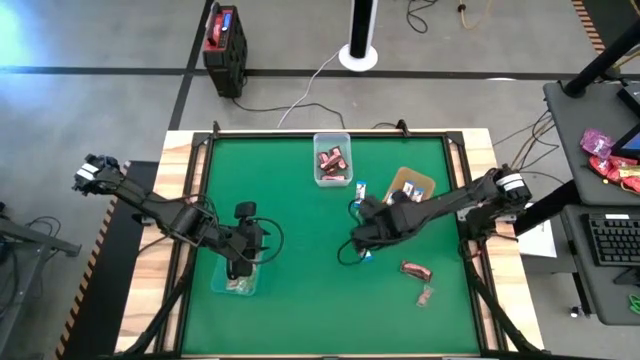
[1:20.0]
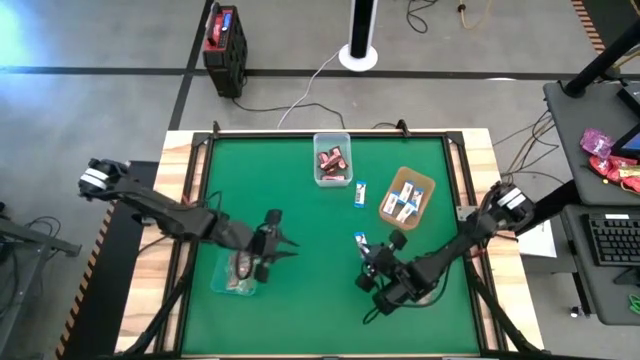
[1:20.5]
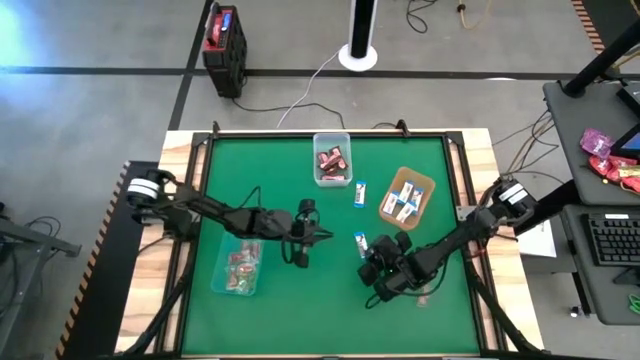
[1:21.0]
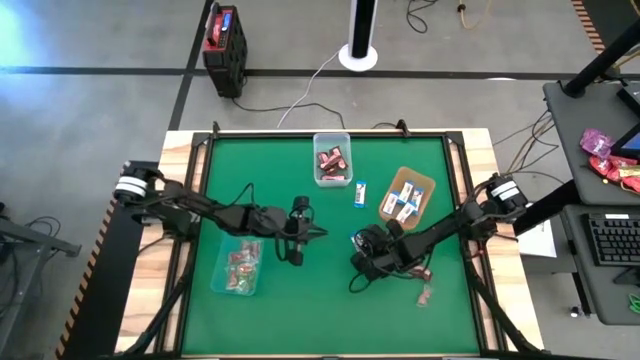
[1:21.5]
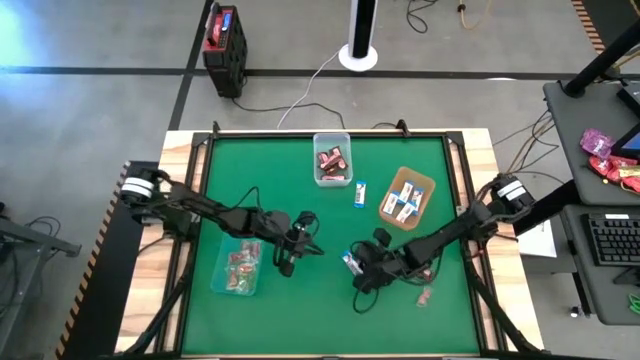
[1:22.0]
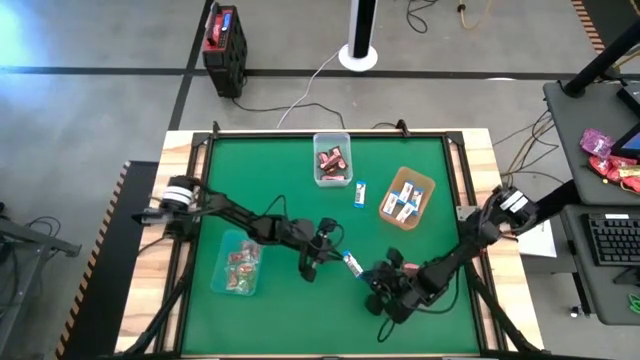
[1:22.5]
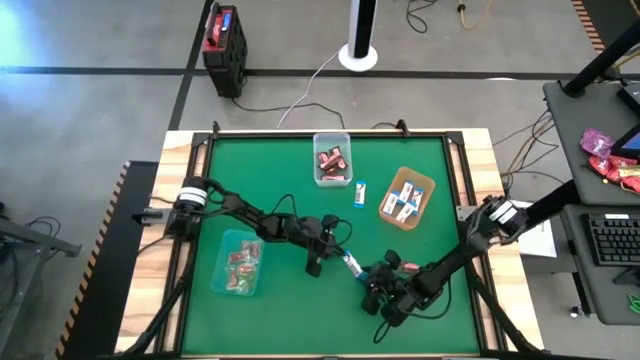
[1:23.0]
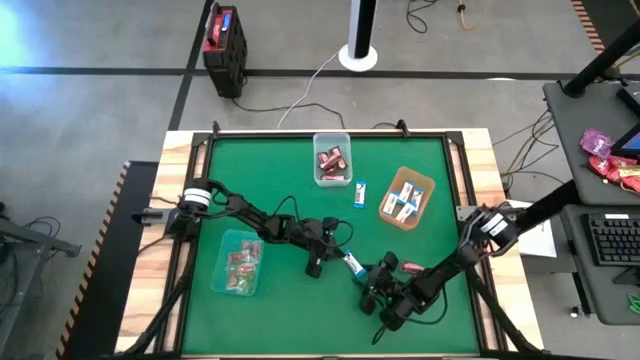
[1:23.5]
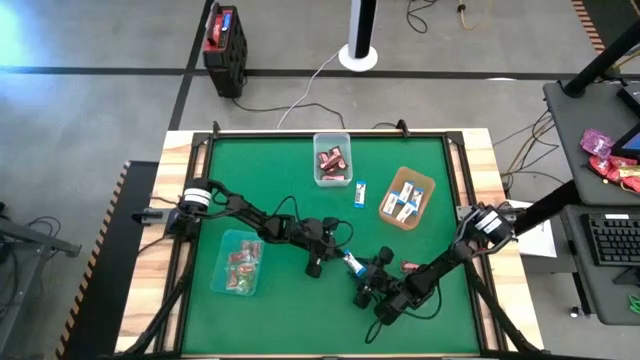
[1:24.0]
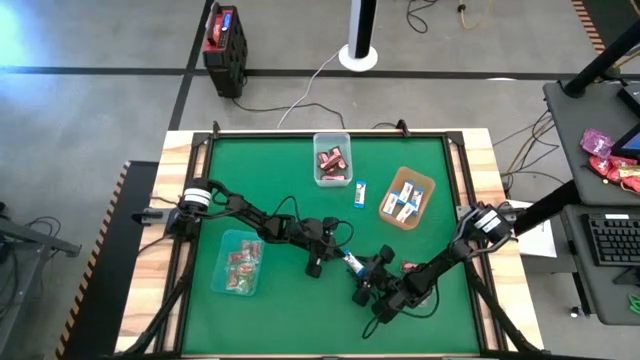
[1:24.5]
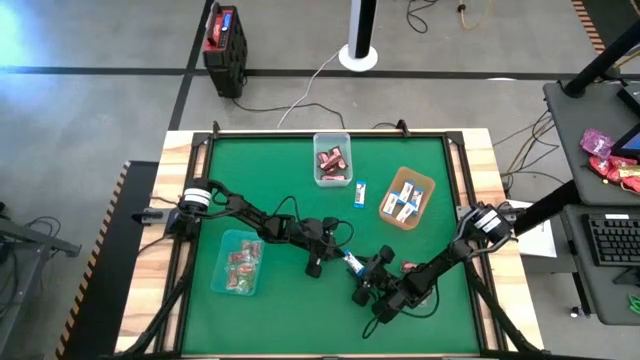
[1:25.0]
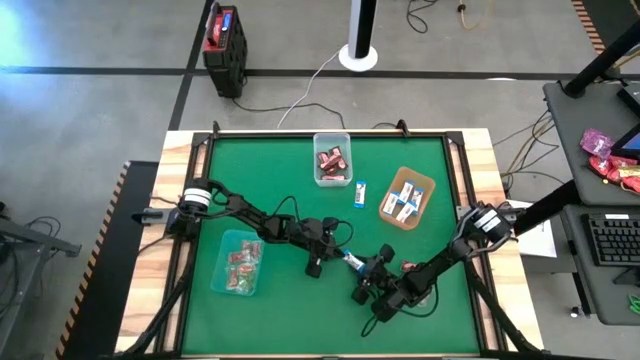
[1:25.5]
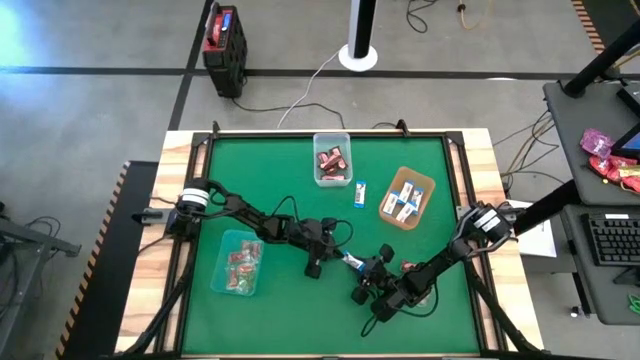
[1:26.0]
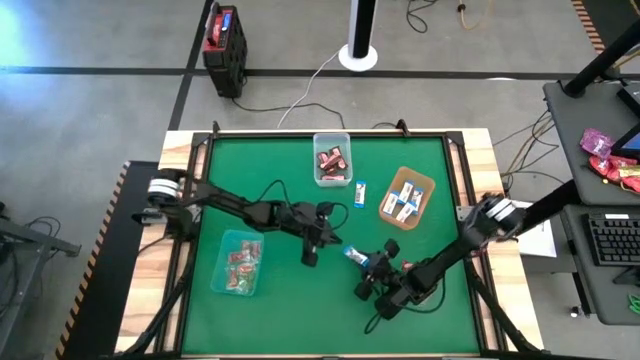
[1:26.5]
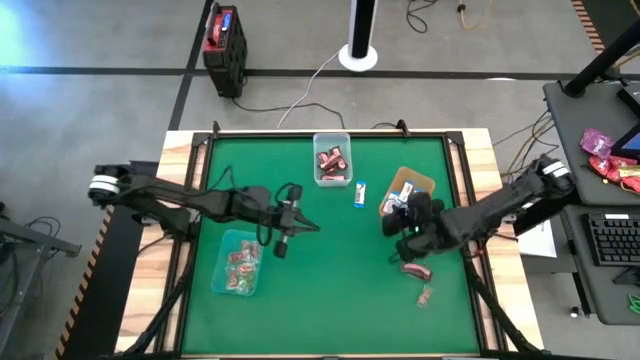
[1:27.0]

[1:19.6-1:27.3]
Task: Sort candy by brand, put in halloween buckets
Put the white chocolate into the orange bin

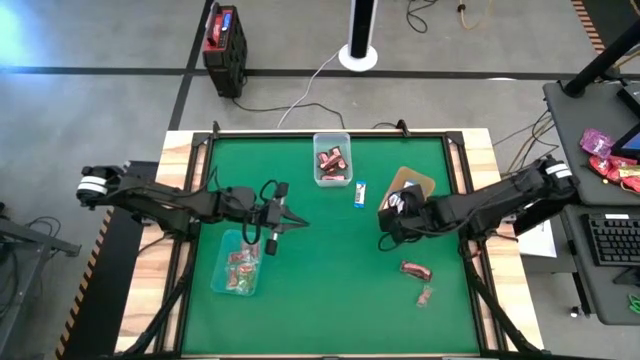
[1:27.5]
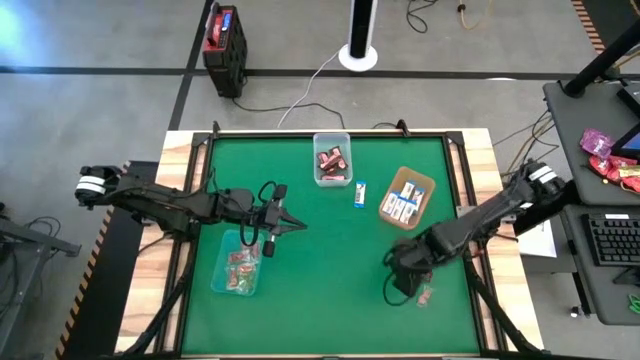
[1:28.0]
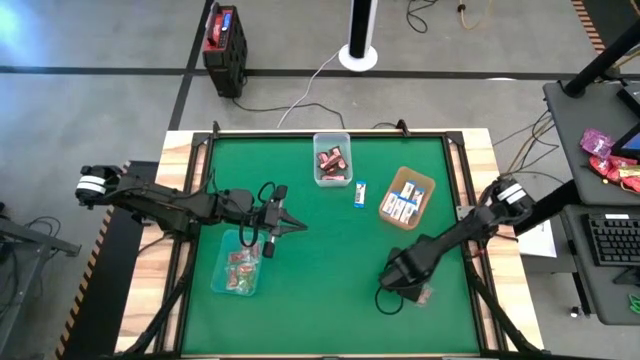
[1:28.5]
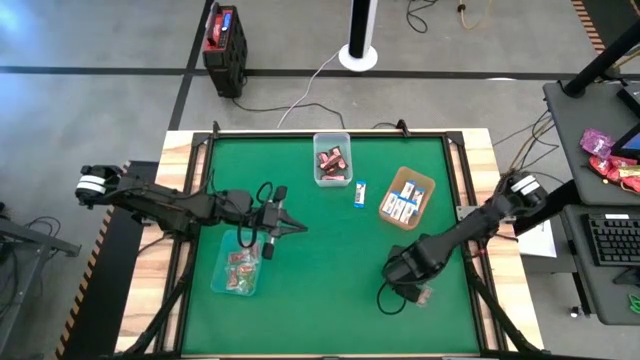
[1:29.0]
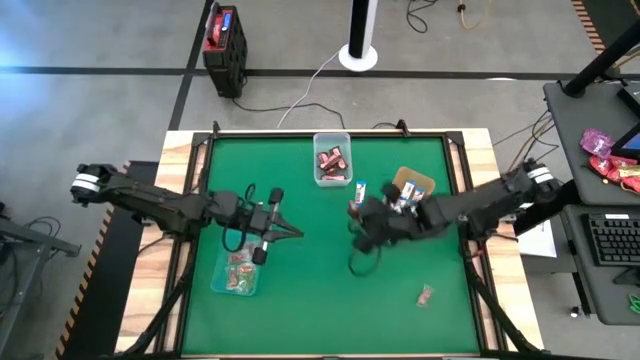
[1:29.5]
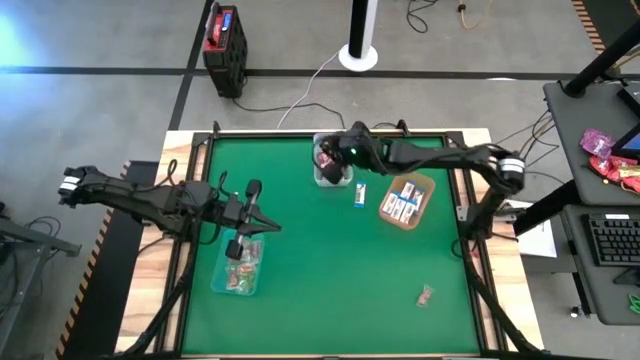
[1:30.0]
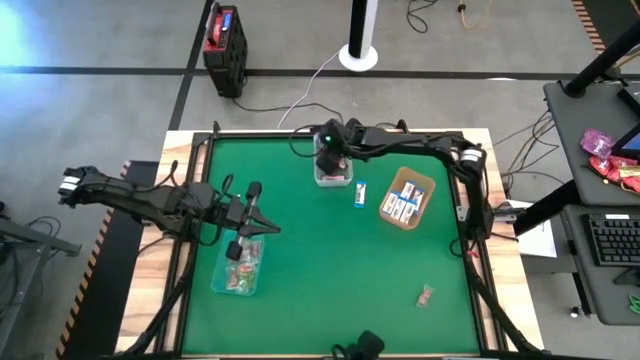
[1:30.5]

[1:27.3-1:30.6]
Put the brown chocolate into the top transparent bin

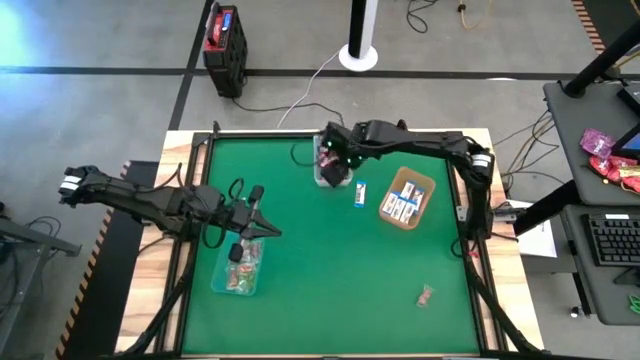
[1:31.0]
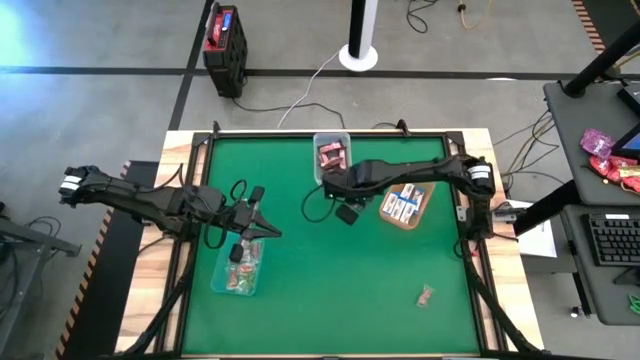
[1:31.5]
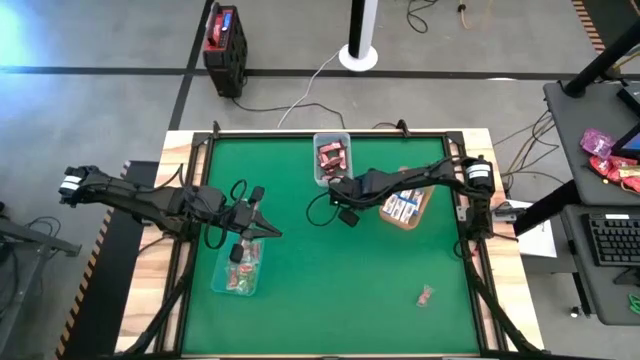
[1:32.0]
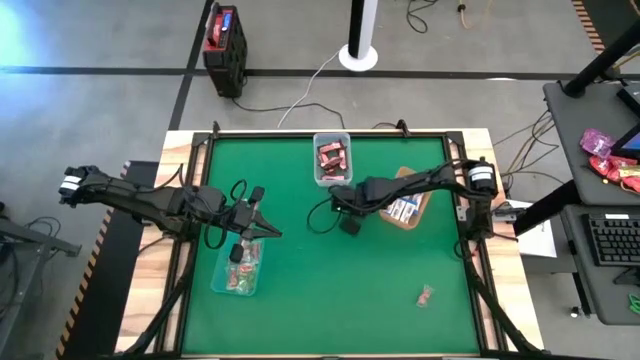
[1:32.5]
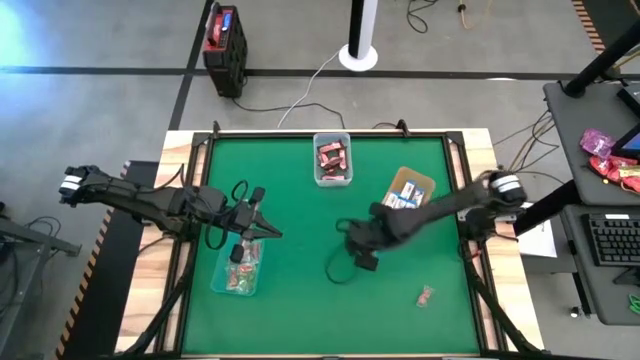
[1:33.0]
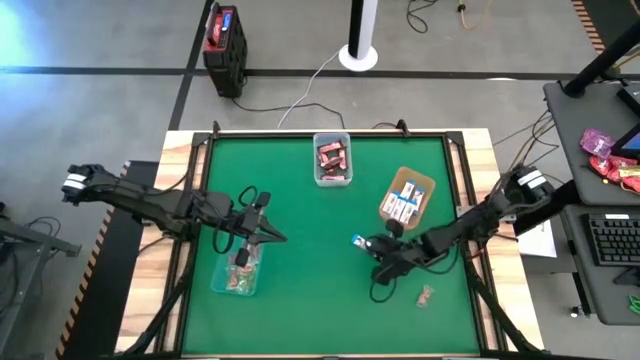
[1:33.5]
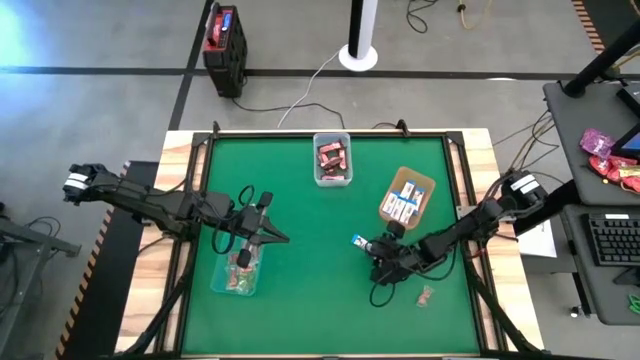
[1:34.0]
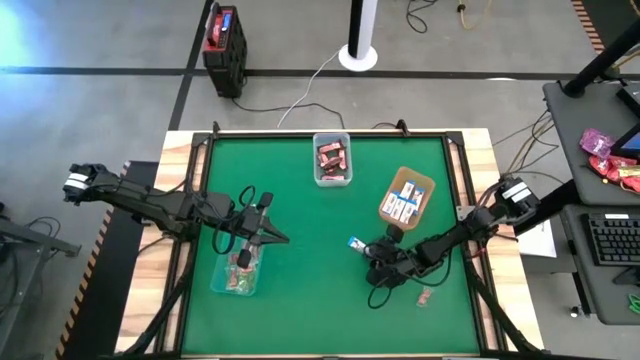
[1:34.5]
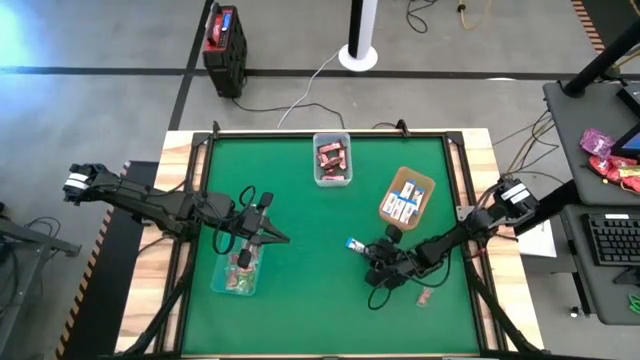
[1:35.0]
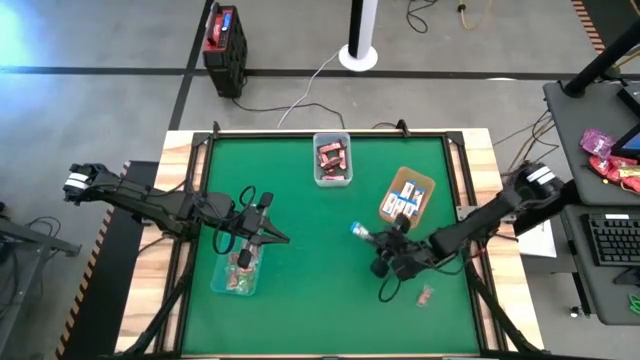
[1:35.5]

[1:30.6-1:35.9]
Put the white chocolate into the orange bin

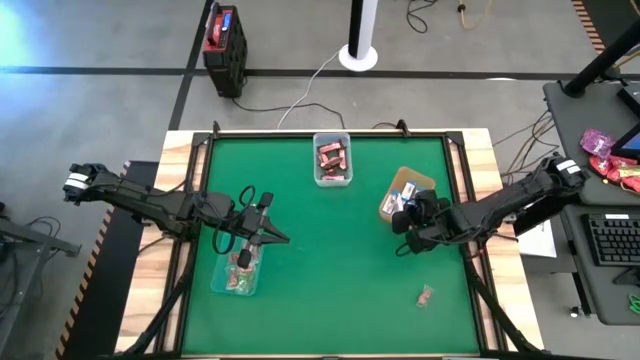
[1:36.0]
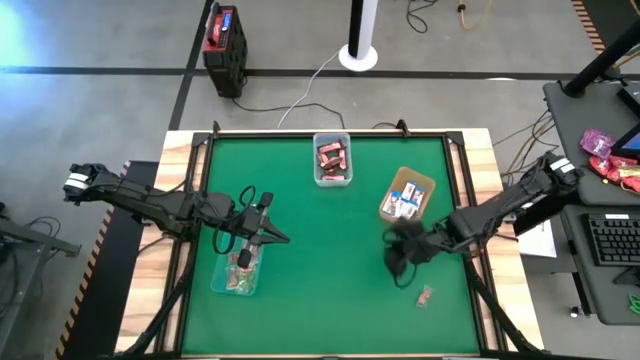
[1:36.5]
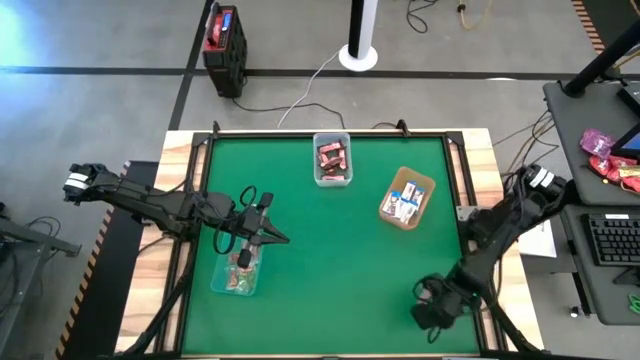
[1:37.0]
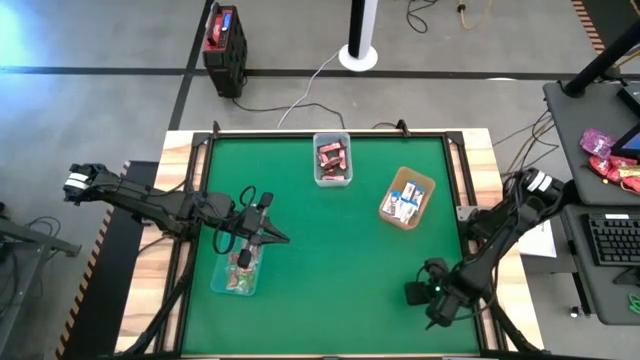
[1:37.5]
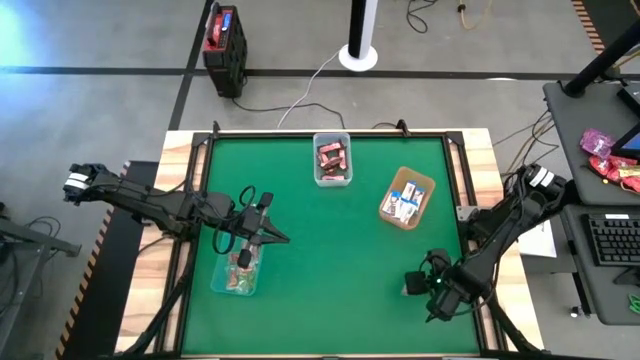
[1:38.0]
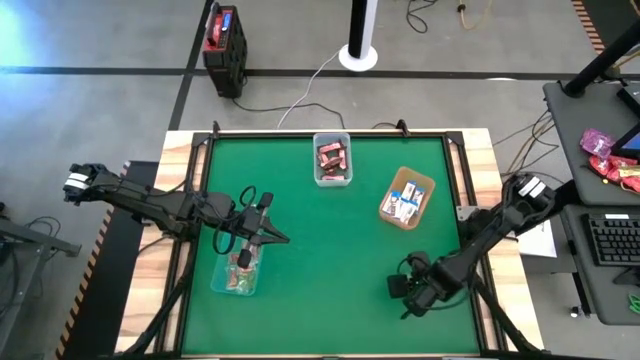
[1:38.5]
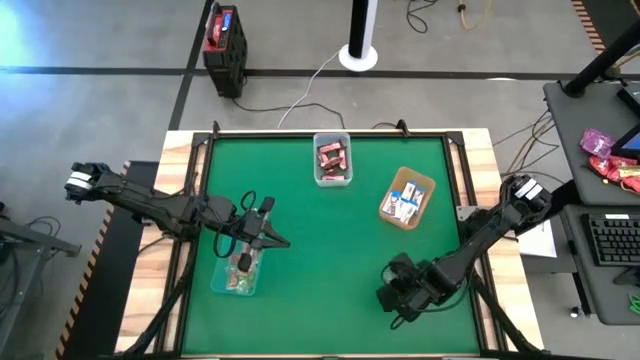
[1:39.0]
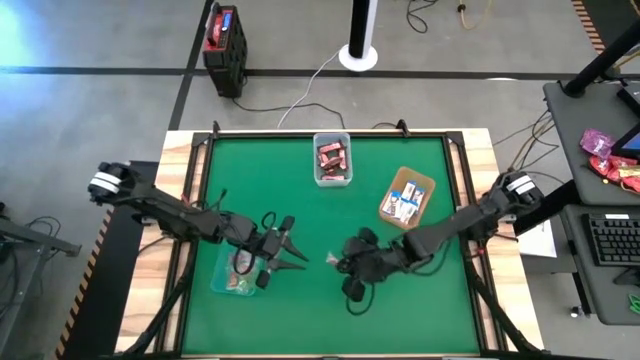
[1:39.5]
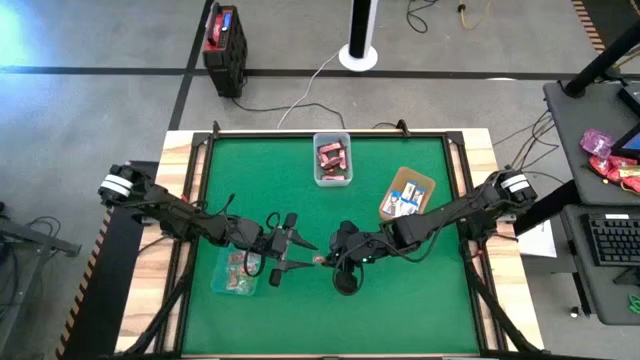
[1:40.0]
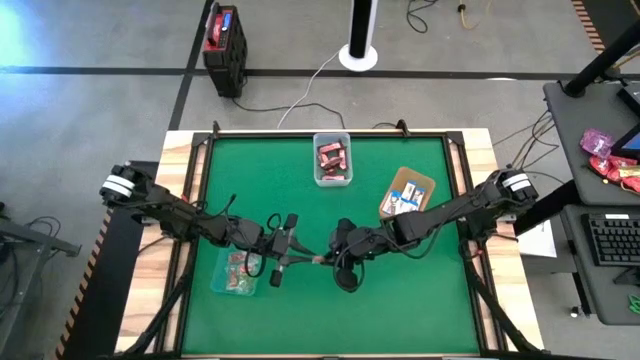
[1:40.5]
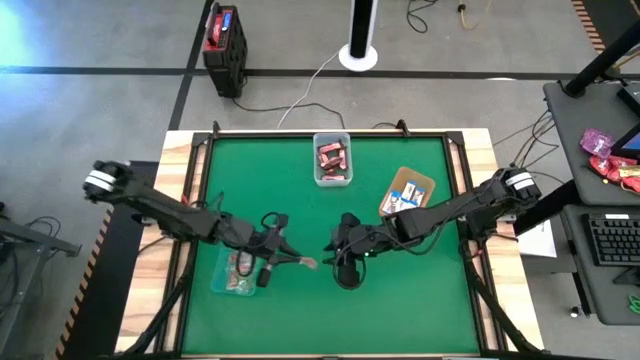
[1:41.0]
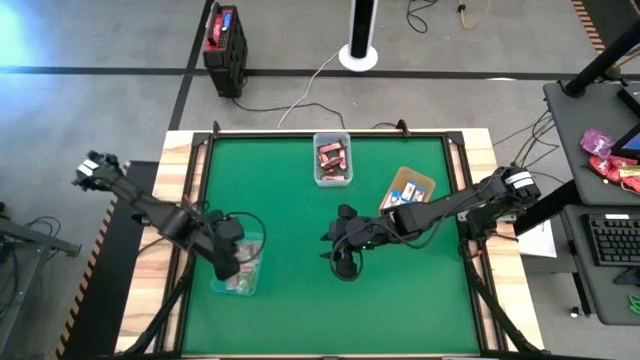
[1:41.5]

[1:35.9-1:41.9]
Put the orange gummy candy into the blue bin
